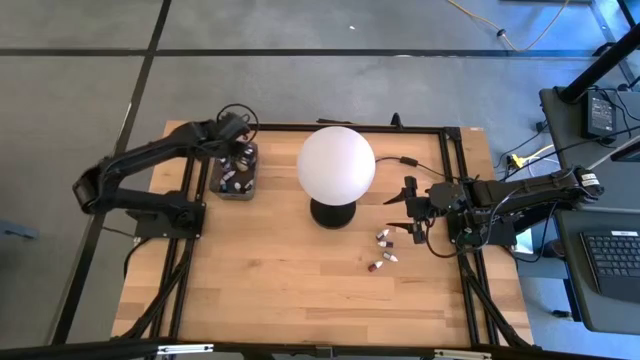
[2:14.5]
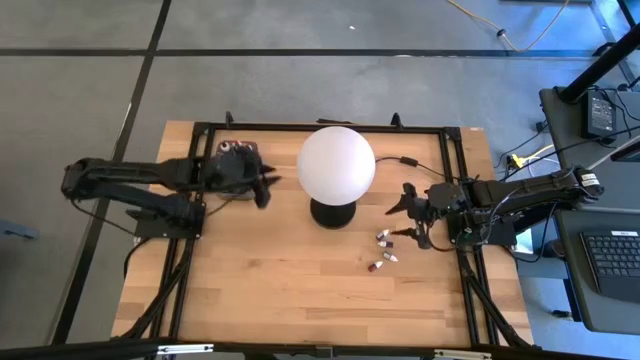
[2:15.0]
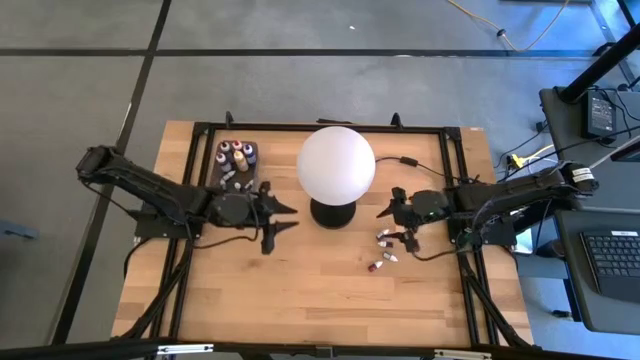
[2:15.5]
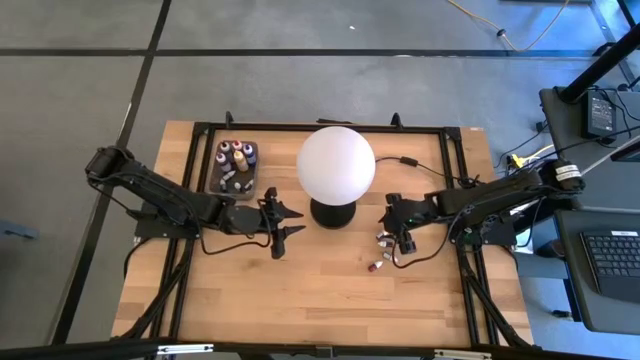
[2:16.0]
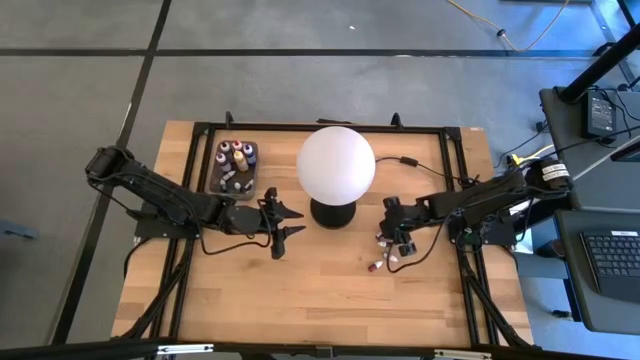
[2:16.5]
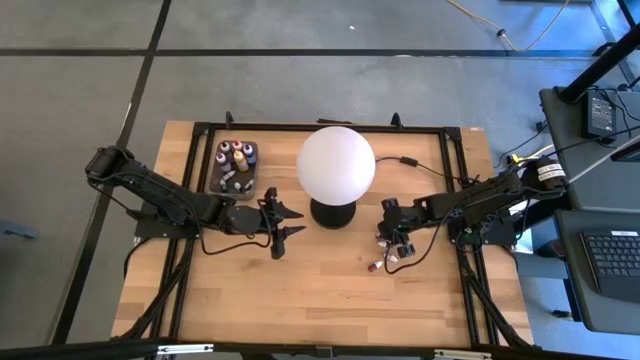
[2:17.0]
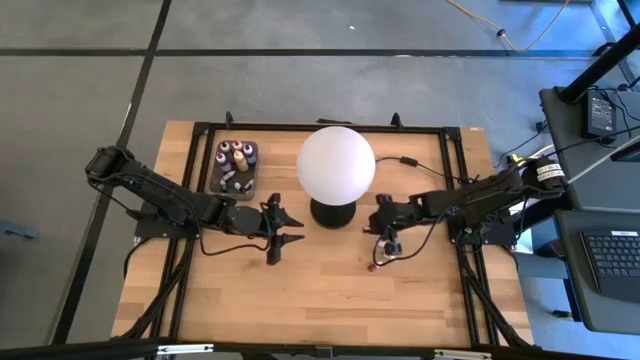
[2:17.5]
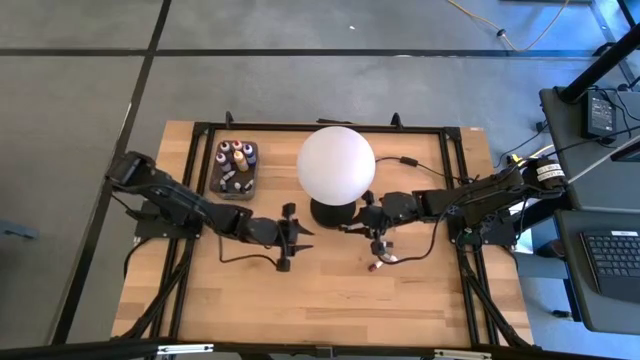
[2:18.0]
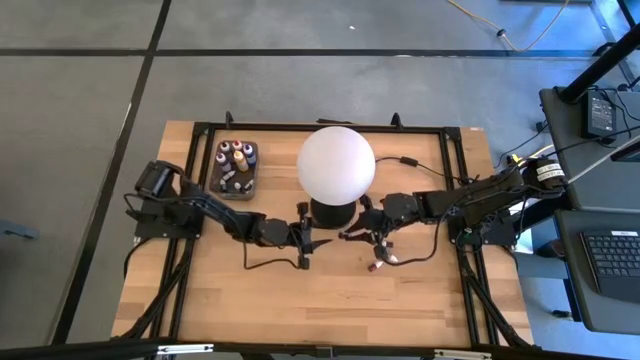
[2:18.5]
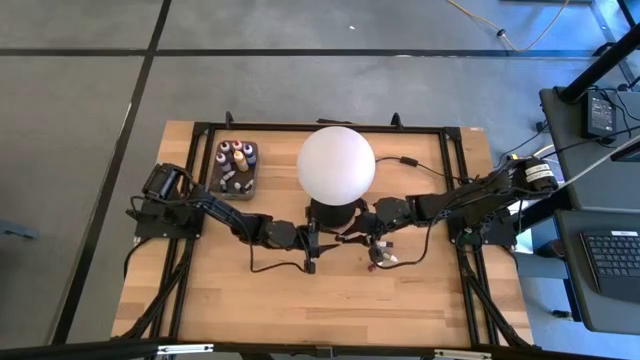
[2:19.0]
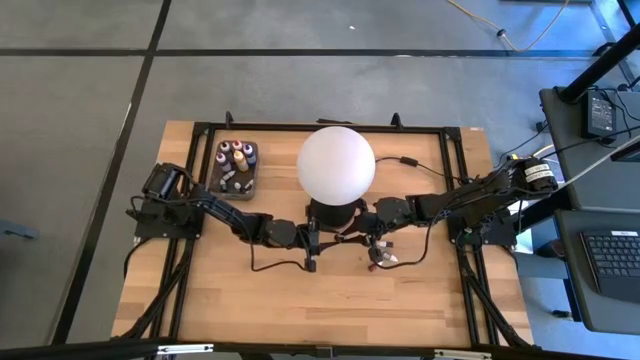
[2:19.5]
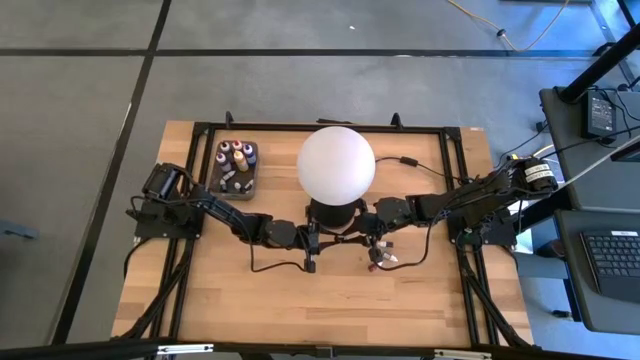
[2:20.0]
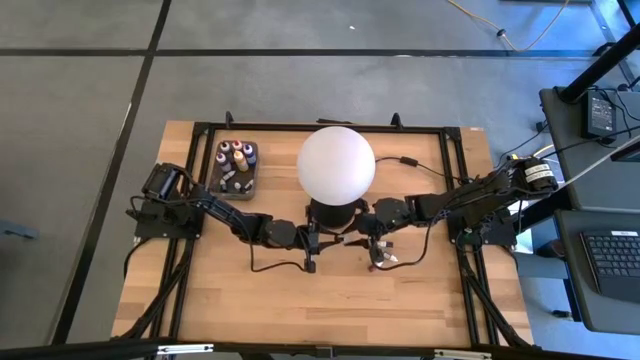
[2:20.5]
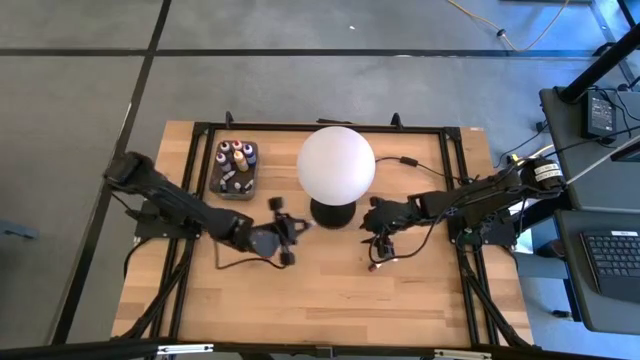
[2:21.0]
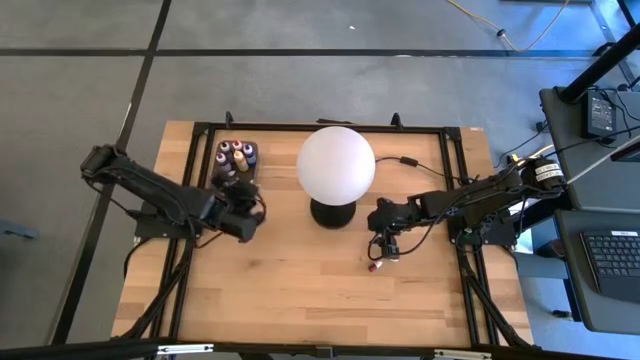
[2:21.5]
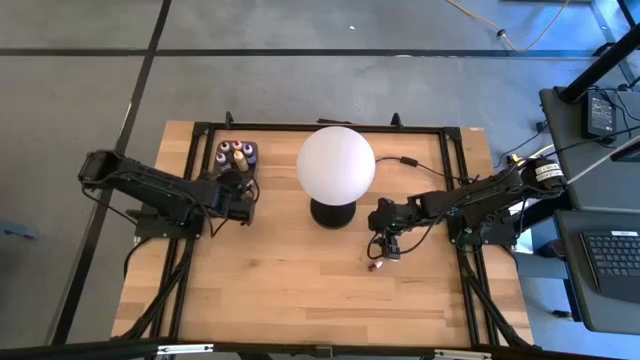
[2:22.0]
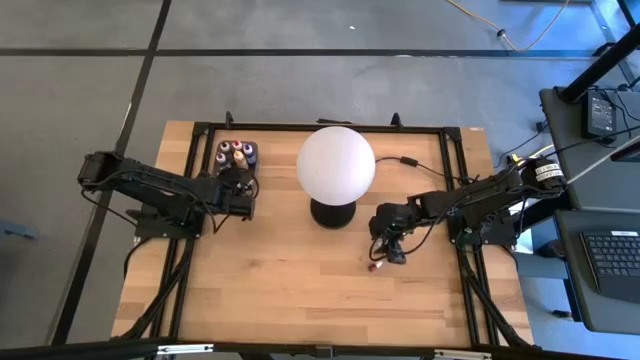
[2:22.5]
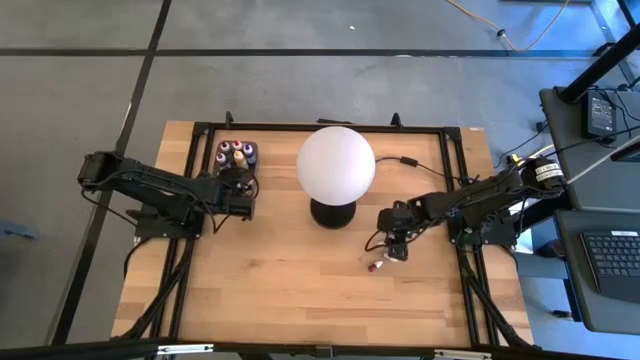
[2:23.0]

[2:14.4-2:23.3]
Task: Pick & Place food coloring
Put the top small red food coloring bottle into the black container

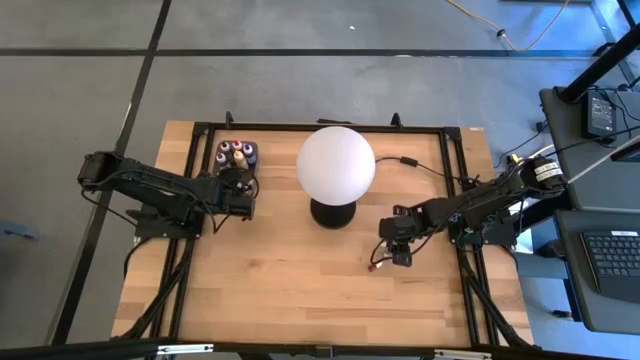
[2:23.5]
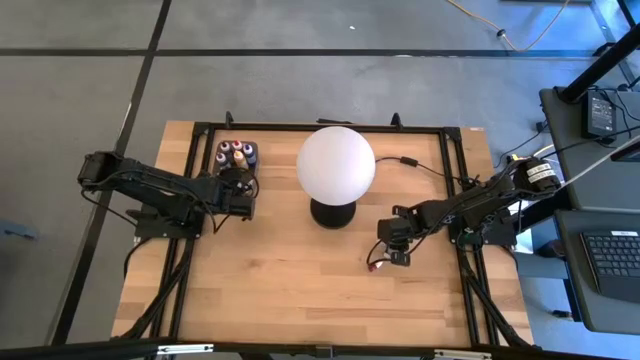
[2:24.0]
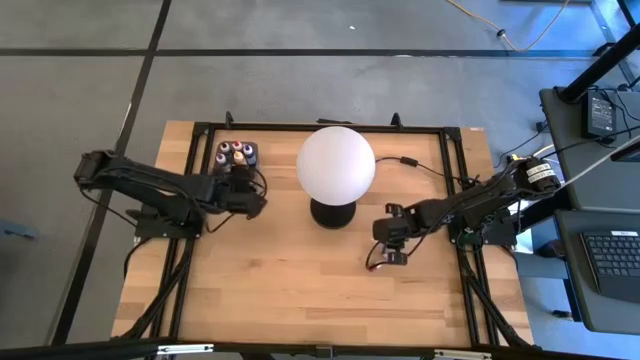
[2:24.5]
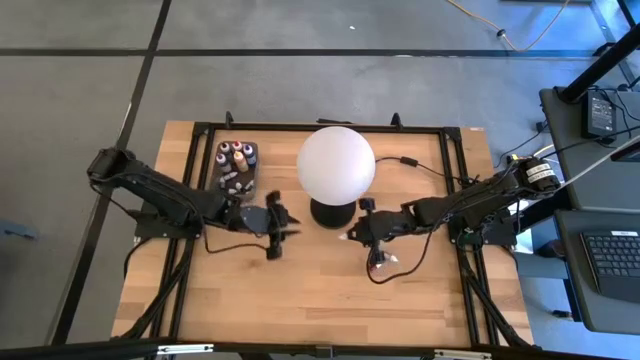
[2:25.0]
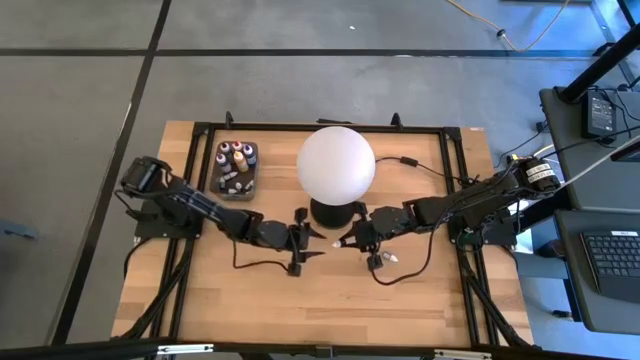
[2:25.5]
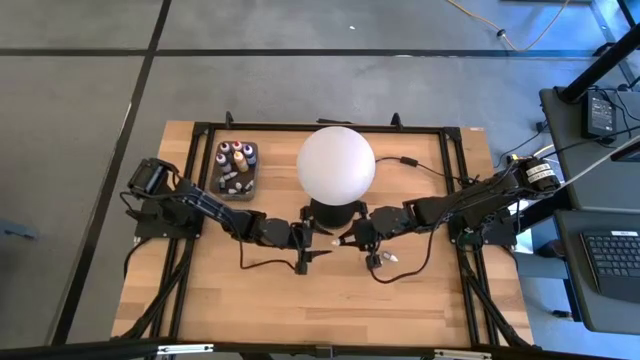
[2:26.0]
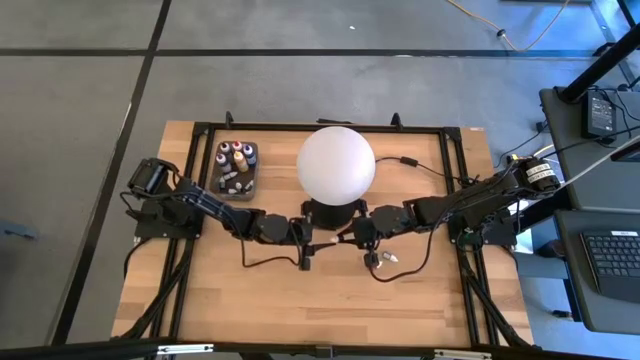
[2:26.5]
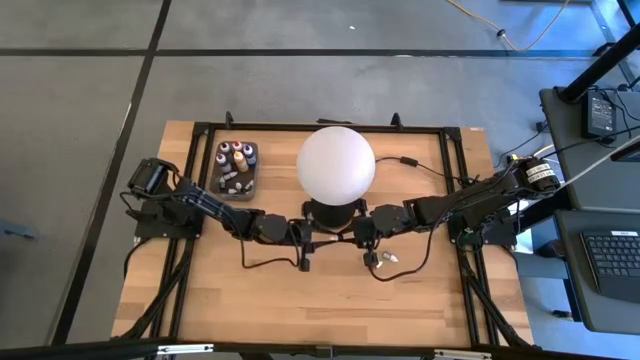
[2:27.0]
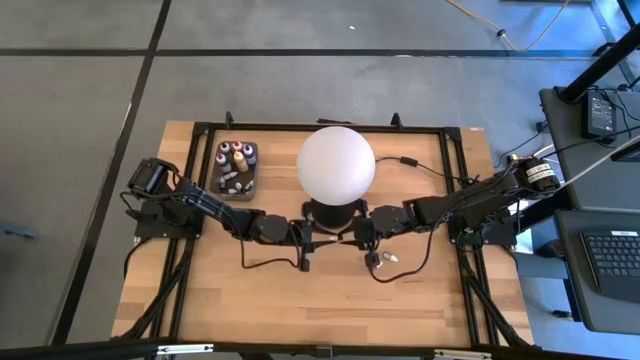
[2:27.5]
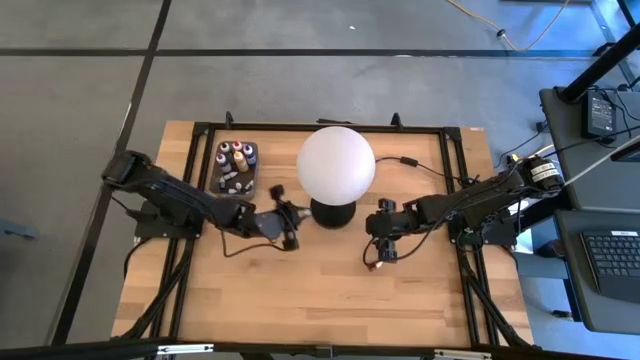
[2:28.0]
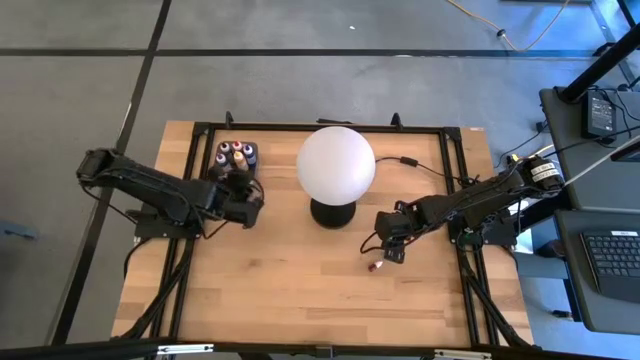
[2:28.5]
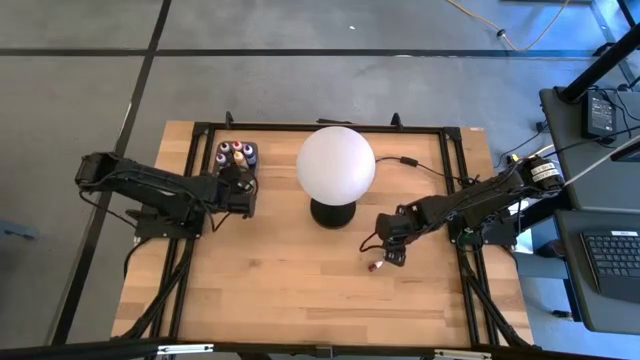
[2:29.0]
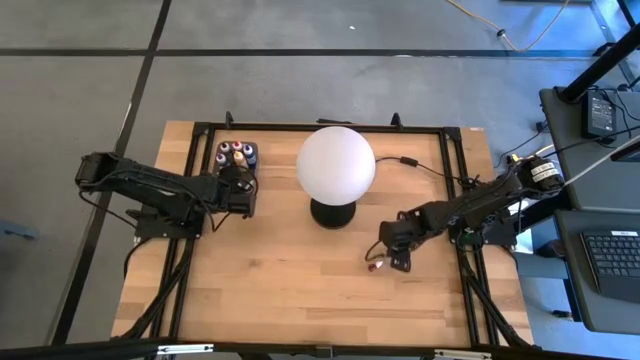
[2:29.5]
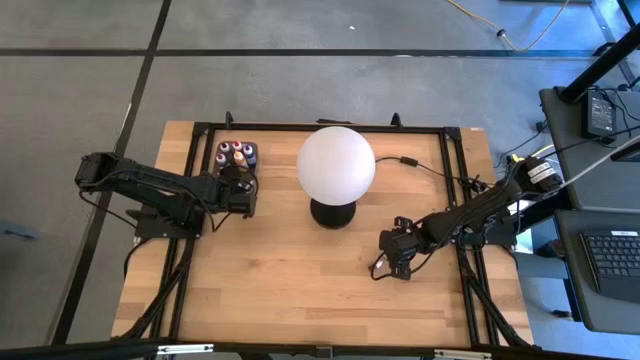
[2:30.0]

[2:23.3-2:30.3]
Put the small pink food coloring bottle into the black container

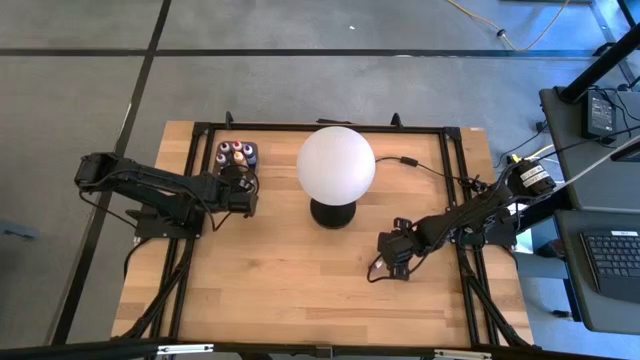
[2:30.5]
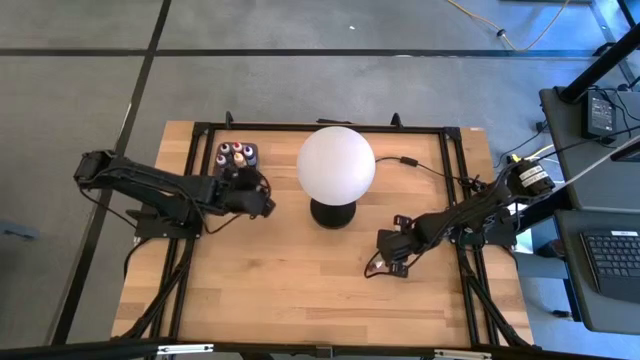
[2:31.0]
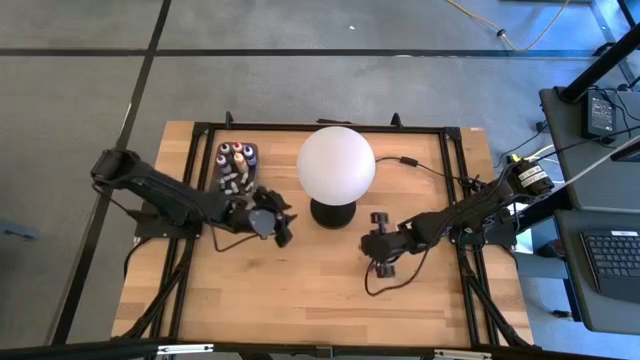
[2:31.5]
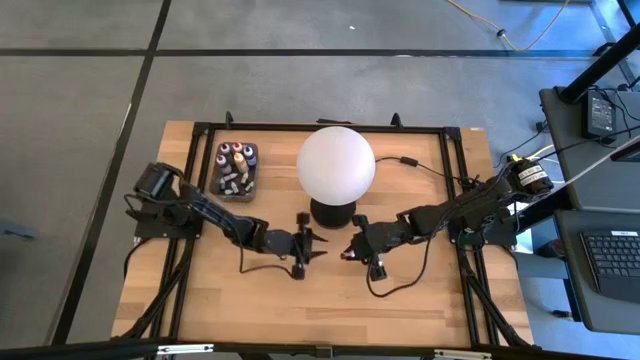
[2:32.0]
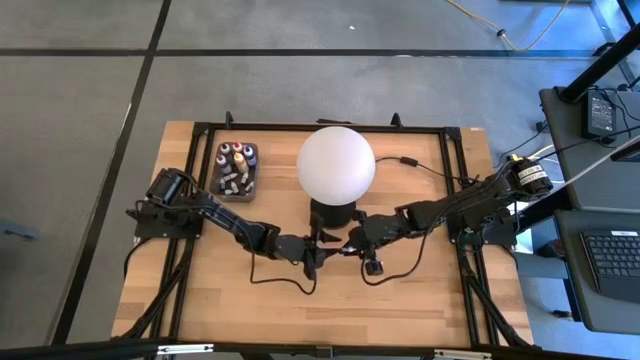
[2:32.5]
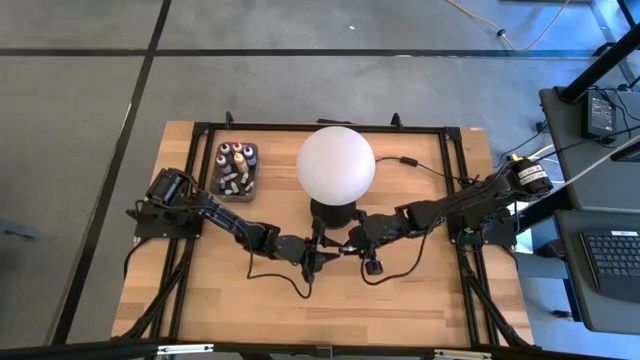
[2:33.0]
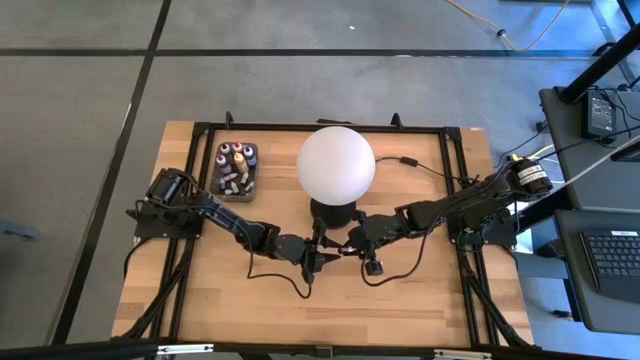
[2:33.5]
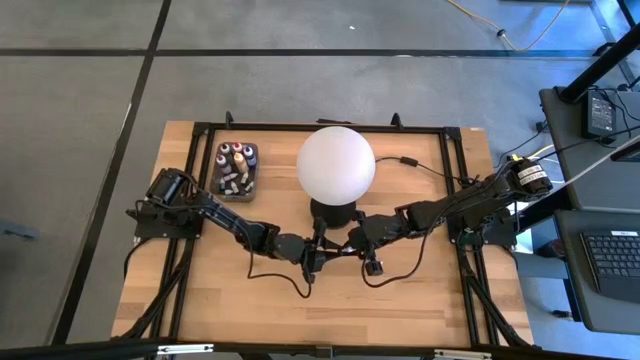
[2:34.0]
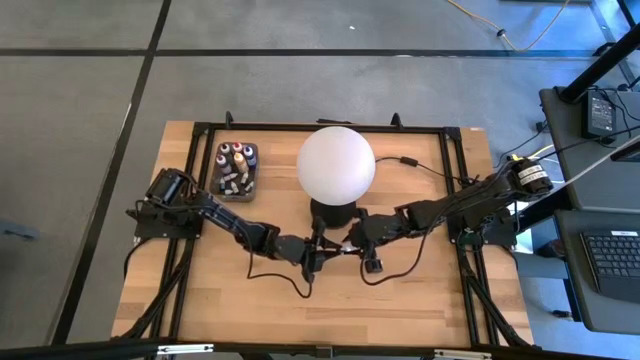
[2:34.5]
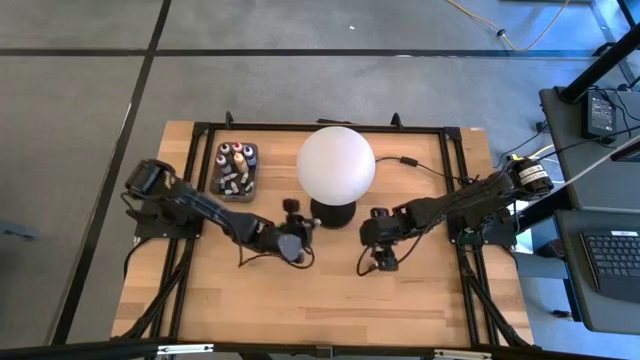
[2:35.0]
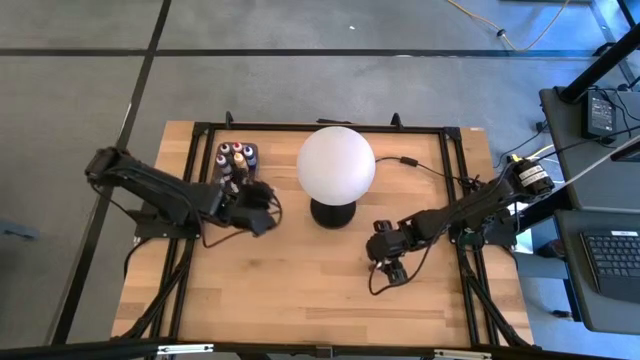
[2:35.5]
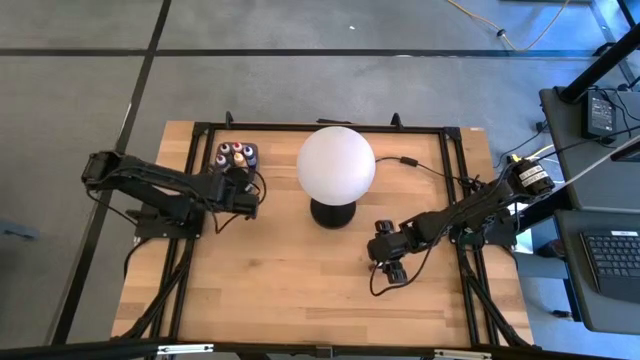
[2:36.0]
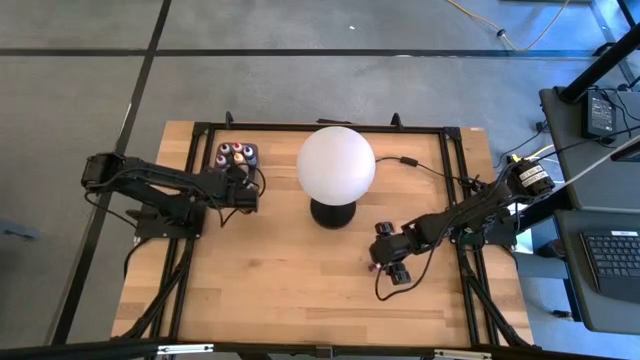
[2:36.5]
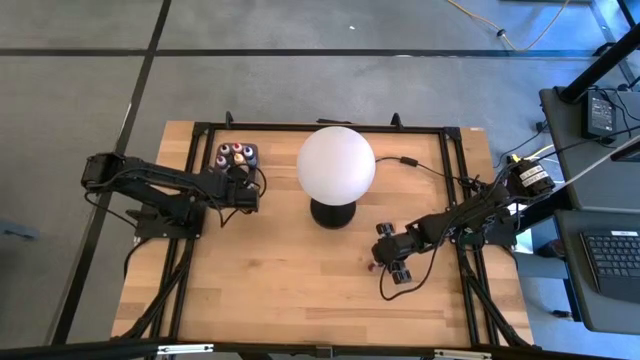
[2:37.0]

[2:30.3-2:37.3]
Put the small green food coloring bottle into the black container
